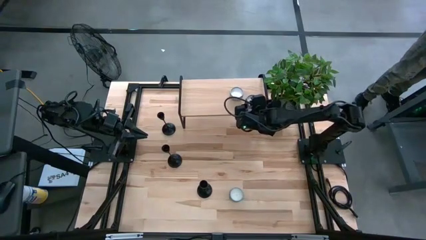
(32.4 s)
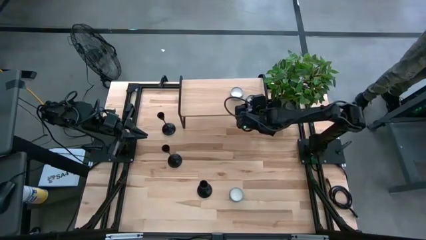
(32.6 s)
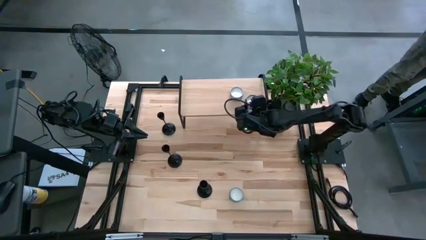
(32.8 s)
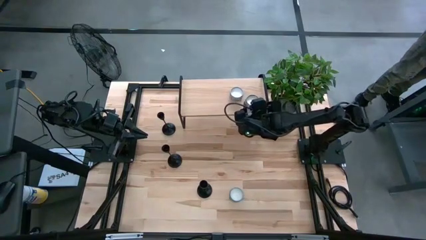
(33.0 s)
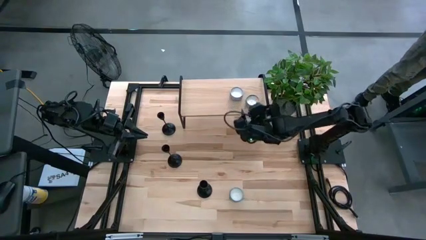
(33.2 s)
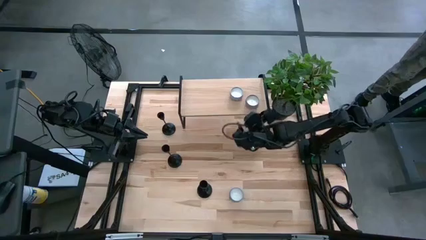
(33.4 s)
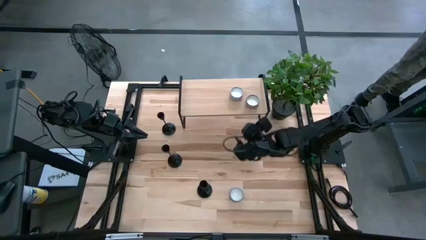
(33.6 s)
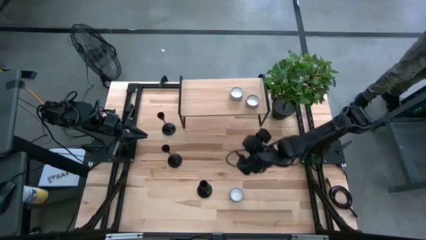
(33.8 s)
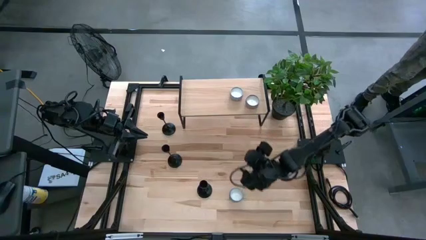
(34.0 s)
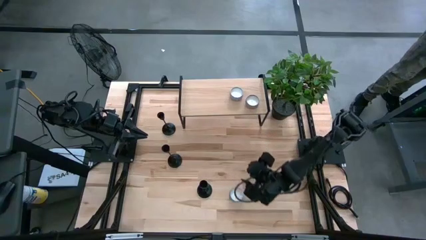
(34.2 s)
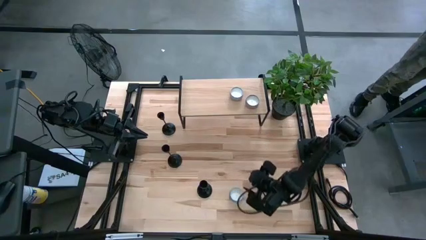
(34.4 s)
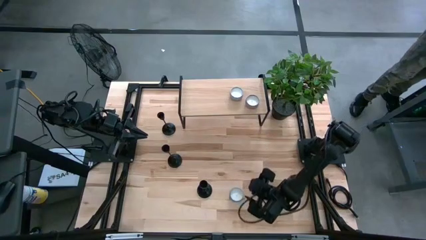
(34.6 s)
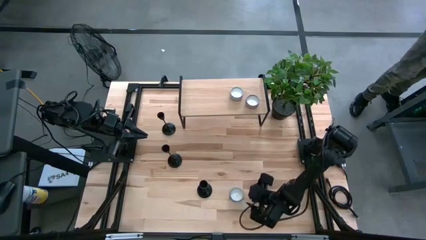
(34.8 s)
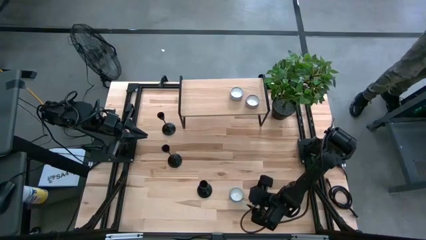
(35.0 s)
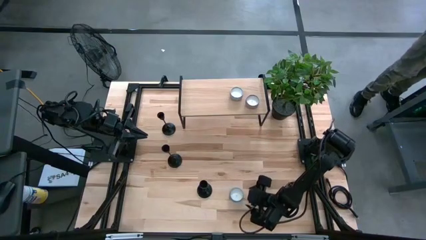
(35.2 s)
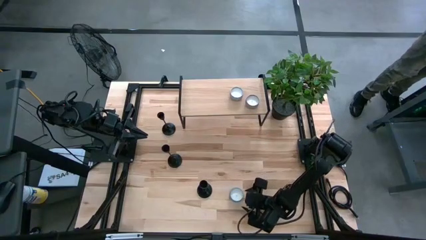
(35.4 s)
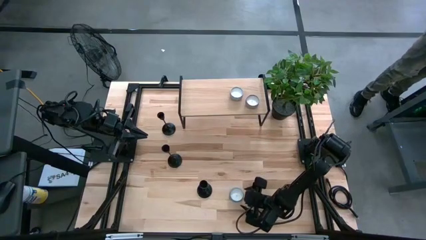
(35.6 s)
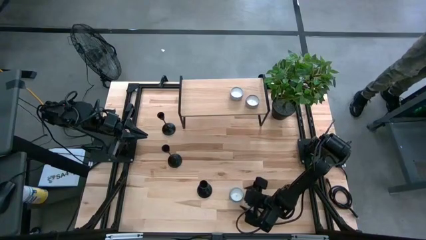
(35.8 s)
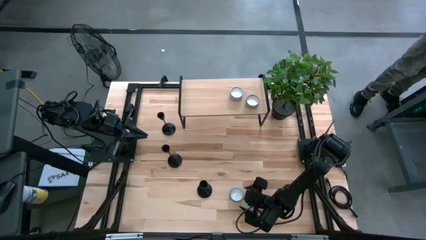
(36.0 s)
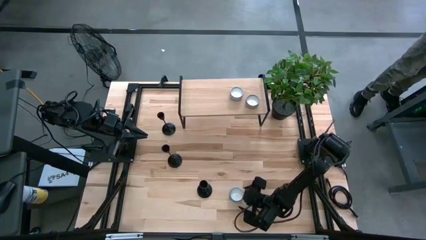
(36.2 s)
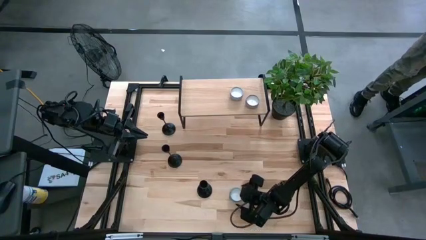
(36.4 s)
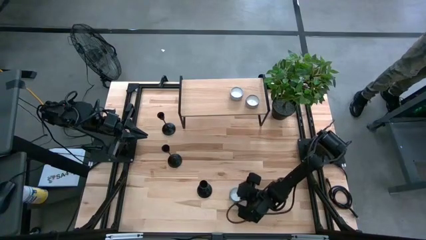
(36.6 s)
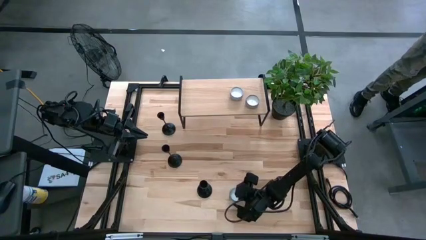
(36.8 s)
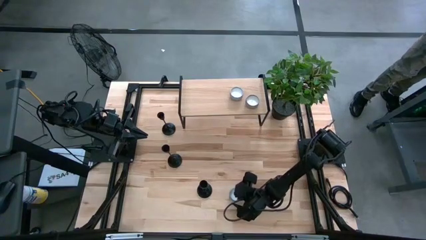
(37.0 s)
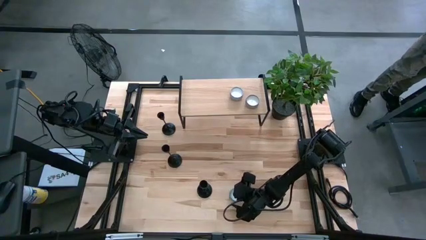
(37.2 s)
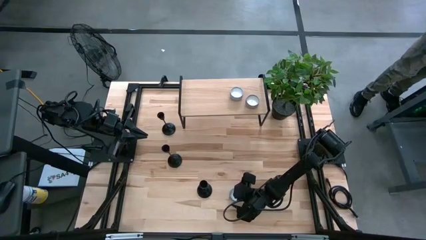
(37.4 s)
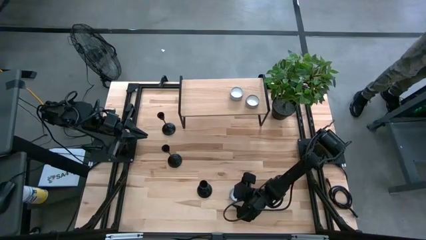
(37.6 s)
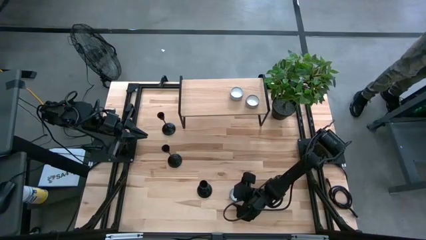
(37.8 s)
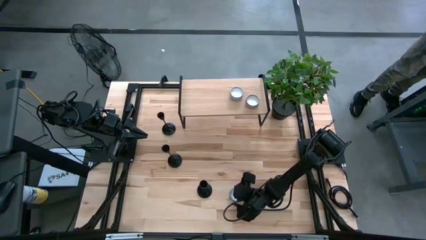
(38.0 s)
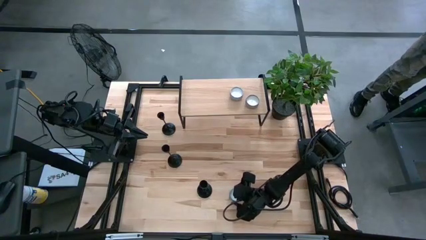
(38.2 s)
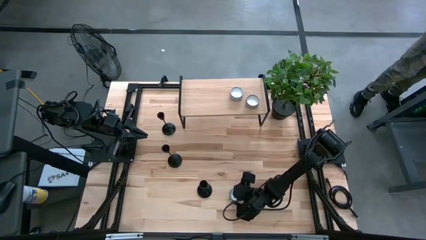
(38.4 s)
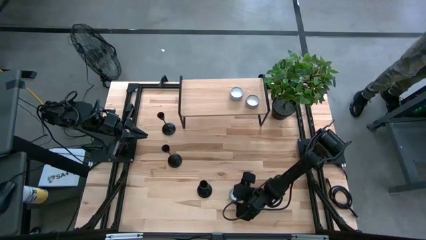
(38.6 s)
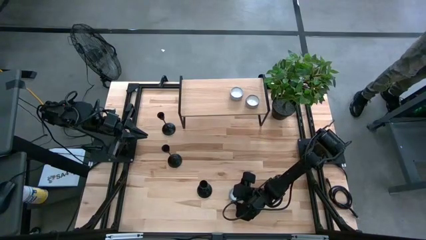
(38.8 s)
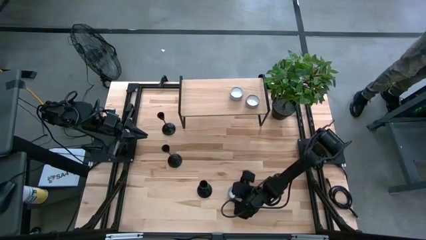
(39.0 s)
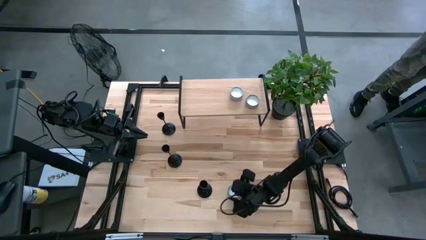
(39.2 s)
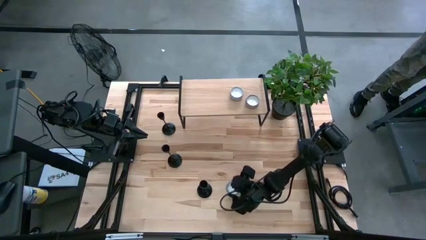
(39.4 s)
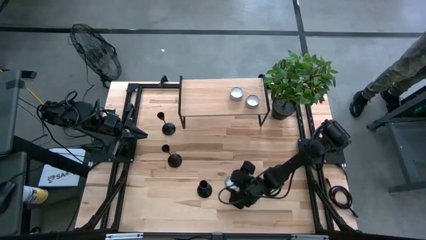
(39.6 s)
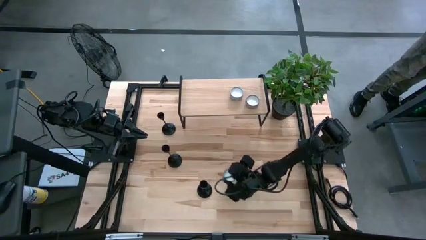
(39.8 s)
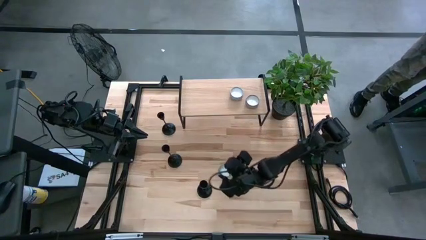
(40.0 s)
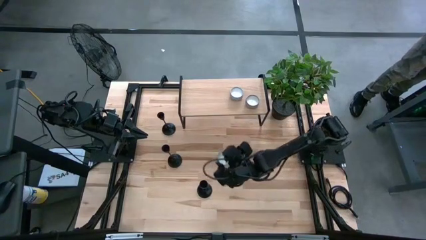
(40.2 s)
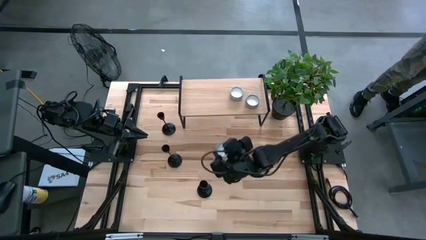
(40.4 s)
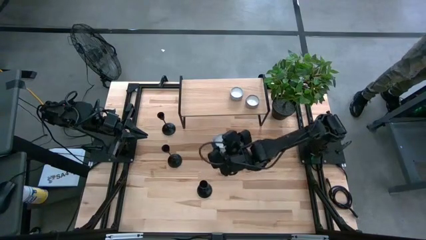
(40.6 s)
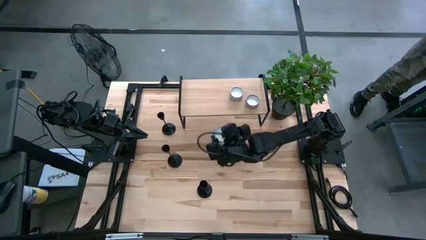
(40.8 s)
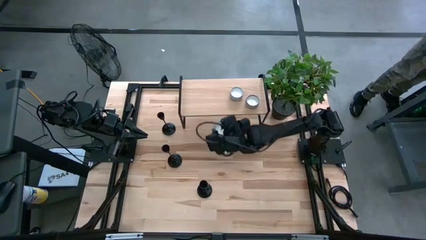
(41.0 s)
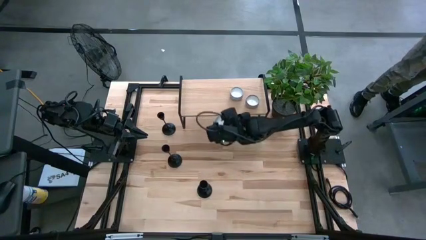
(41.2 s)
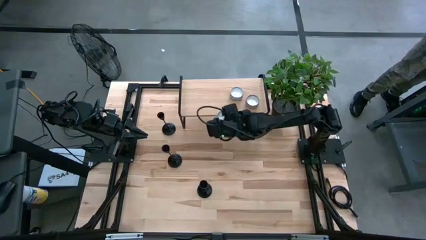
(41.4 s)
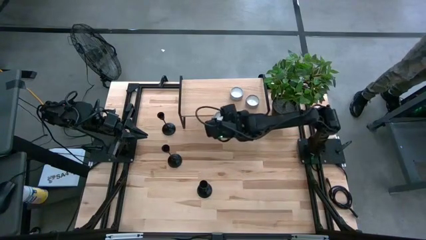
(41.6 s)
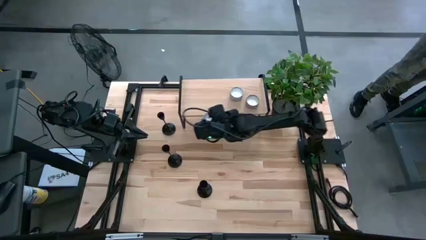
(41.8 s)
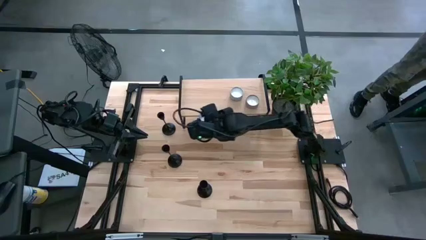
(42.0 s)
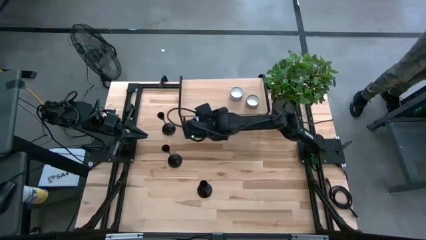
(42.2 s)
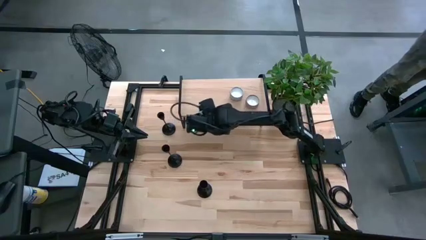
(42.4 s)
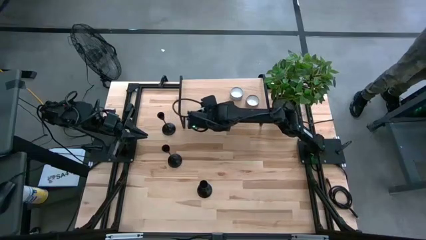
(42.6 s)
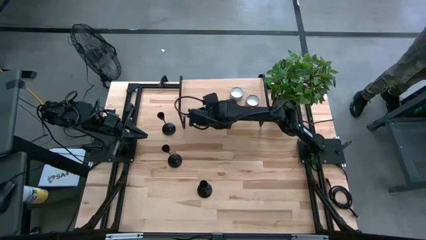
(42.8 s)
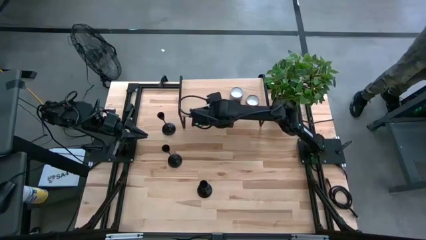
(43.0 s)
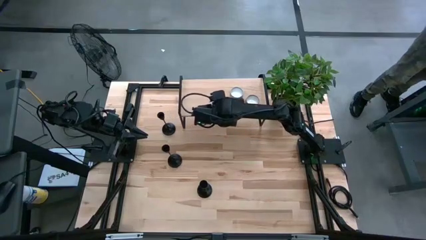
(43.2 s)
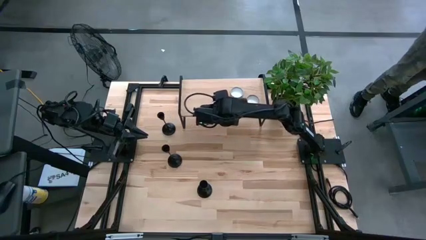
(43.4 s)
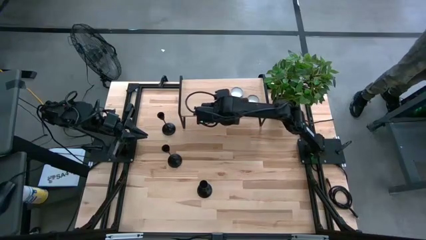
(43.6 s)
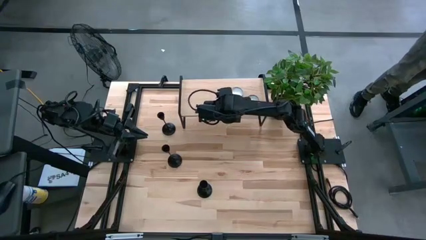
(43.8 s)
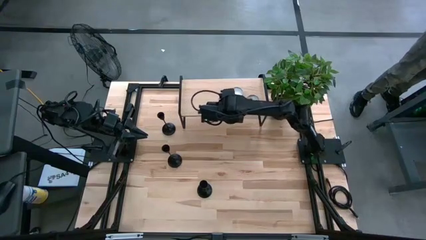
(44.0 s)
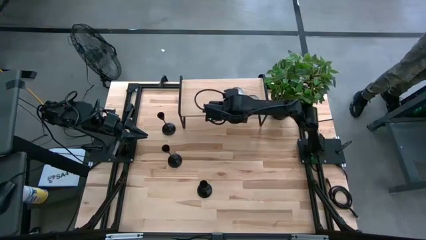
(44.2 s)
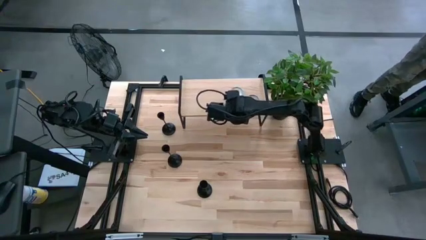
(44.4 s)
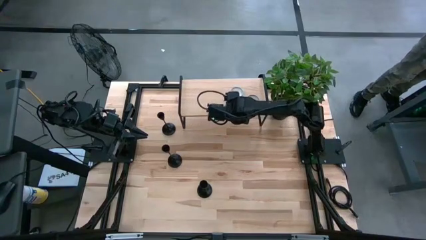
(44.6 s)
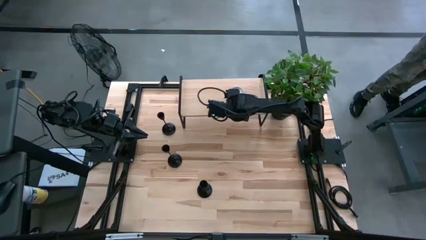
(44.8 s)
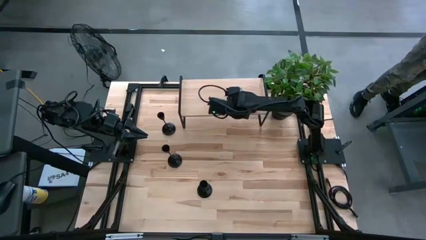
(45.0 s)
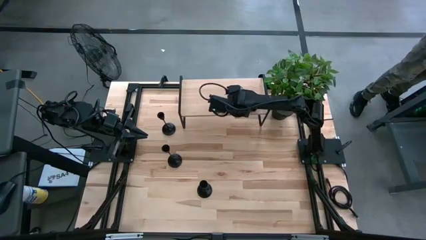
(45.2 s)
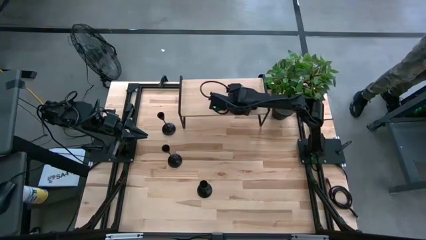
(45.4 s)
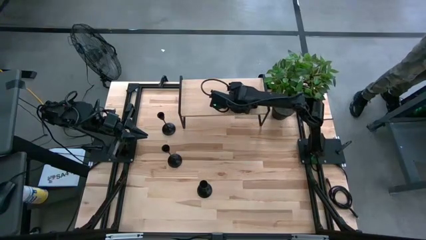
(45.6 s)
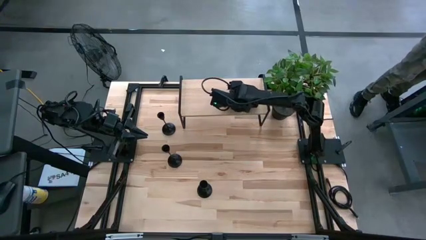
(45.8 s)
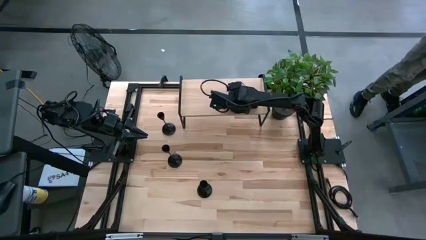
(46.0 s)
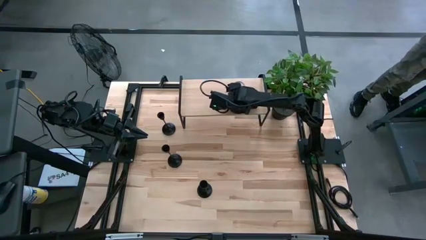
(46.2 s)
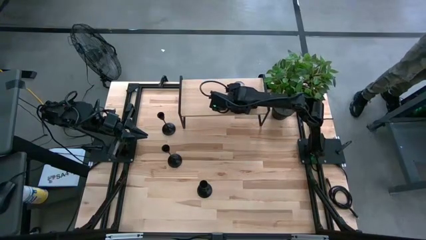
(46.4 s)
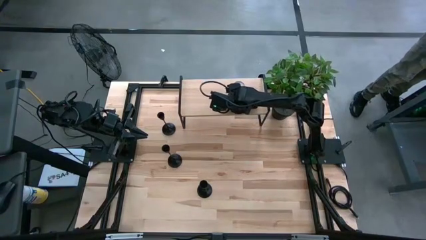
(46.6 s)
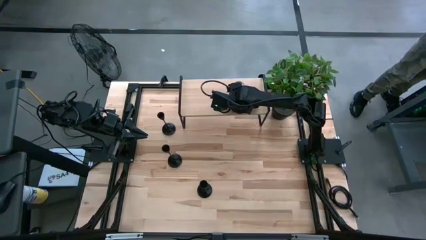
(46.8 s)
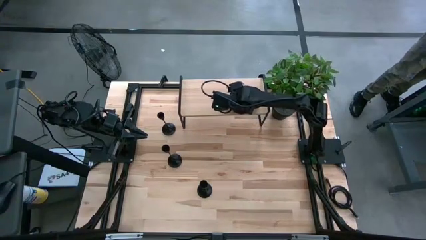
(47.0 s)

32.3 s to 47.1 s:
Task: Pick & Place candle stick holders
Put the blue scented candle on the shelf

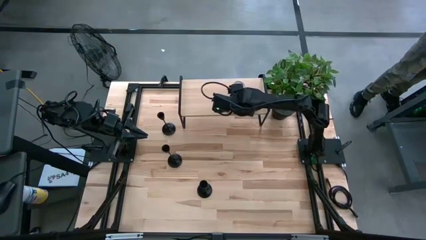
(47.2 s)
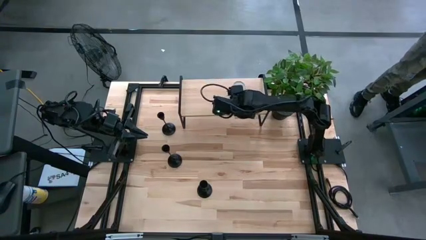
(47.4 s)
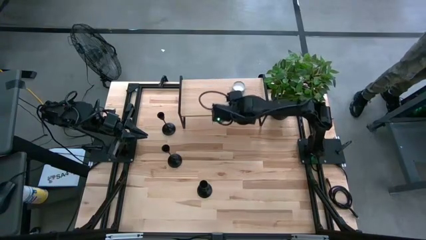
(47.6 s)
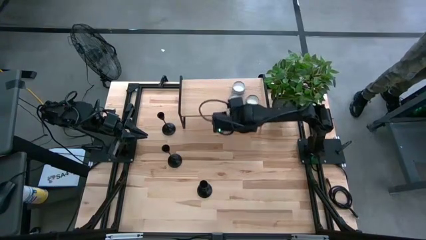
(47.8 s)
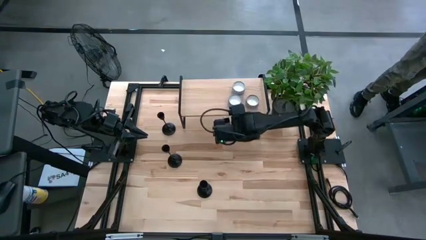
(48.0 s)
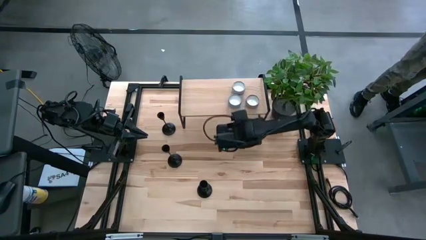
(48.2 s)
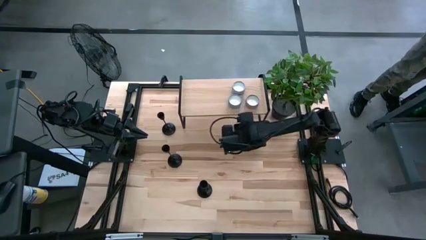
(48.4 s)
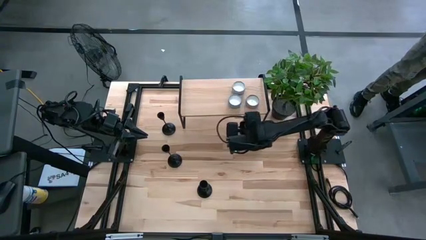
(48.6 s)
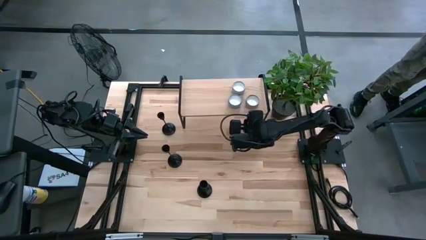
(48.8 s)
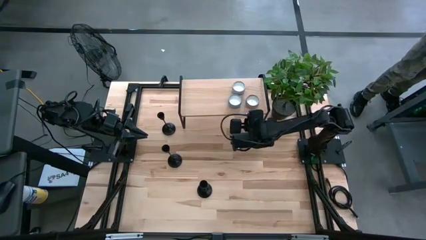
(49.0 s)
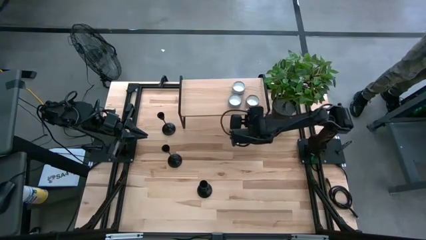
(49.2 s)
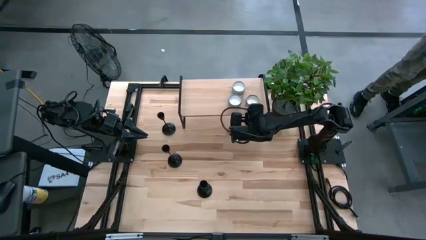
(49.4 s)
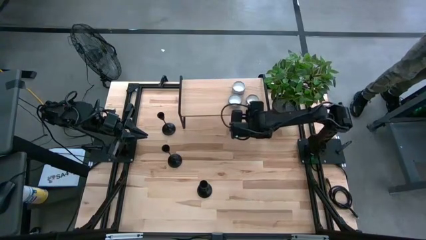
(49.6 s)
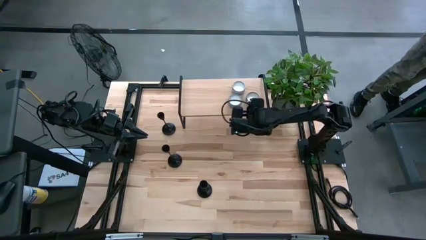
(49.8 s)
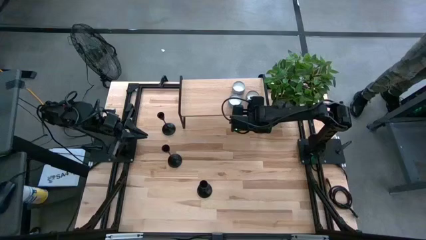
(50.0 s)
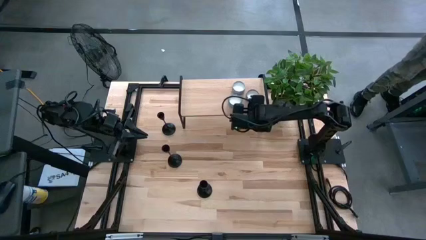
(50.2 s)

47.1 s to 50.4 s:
Adjust the pink scented candle on the shelf
